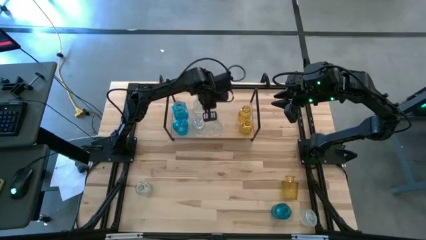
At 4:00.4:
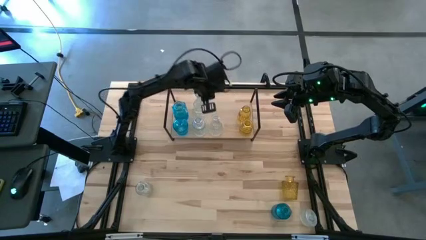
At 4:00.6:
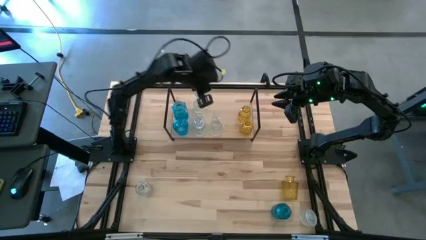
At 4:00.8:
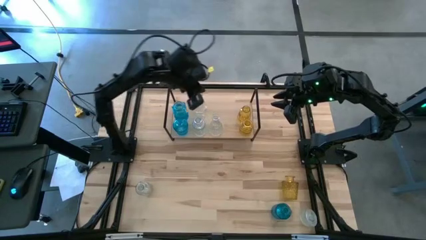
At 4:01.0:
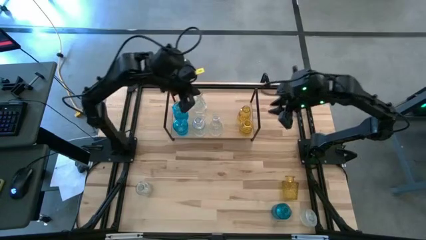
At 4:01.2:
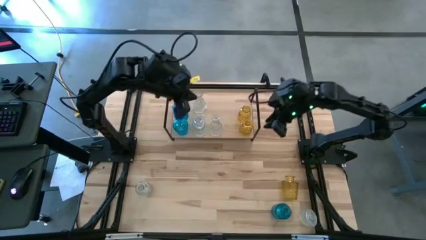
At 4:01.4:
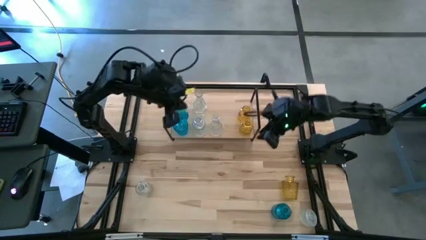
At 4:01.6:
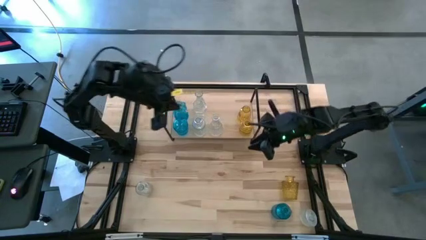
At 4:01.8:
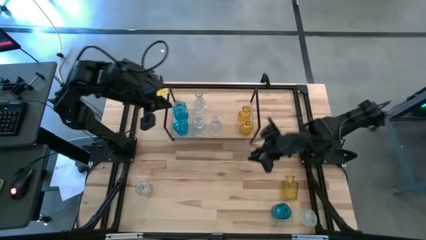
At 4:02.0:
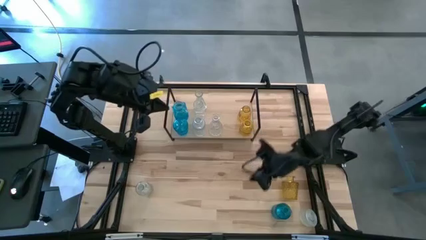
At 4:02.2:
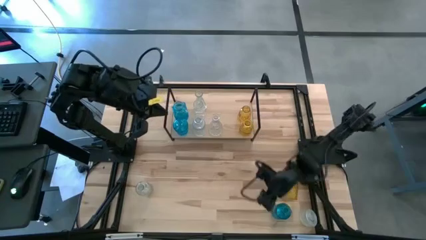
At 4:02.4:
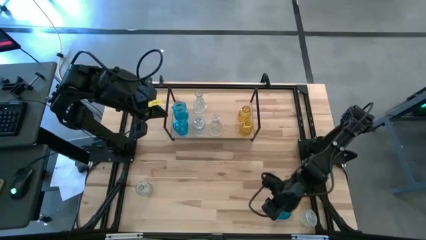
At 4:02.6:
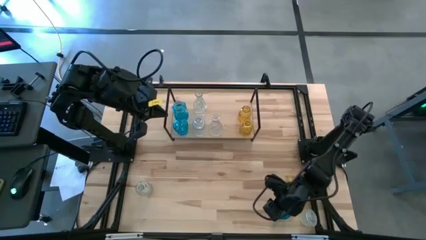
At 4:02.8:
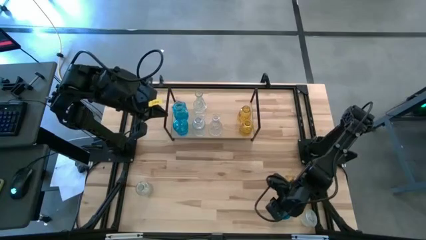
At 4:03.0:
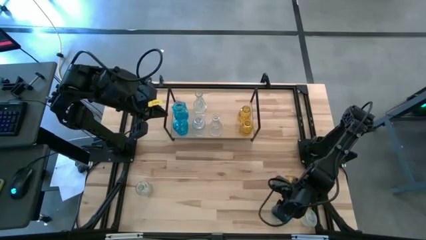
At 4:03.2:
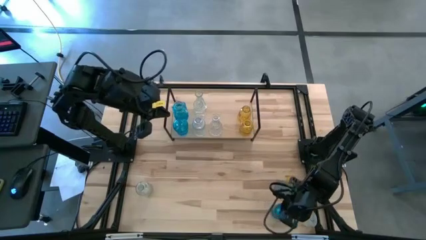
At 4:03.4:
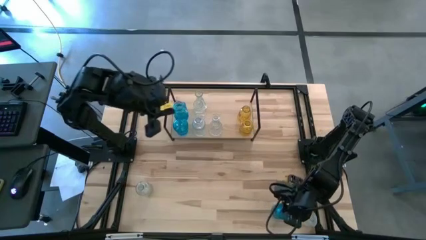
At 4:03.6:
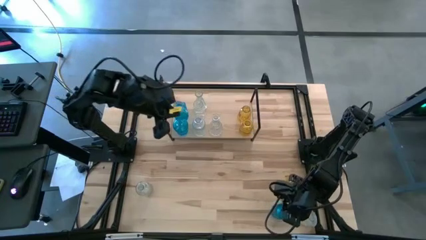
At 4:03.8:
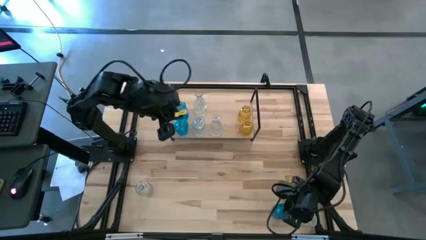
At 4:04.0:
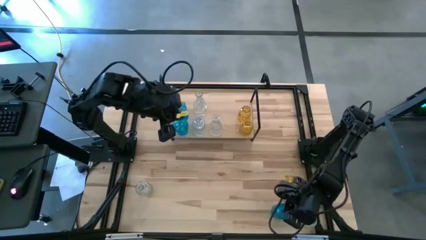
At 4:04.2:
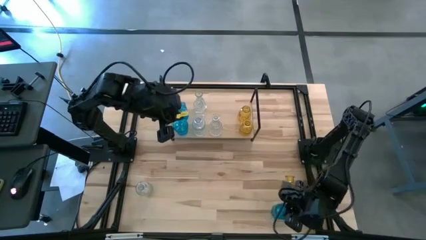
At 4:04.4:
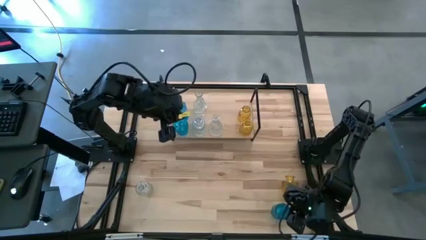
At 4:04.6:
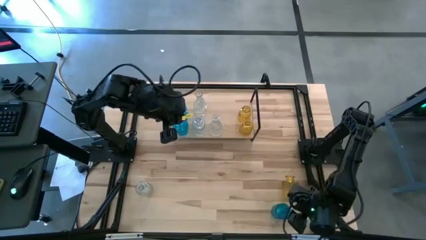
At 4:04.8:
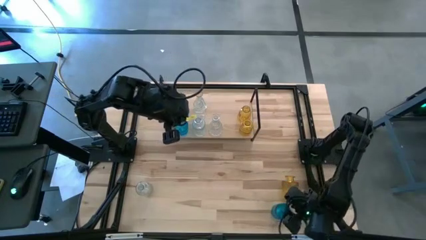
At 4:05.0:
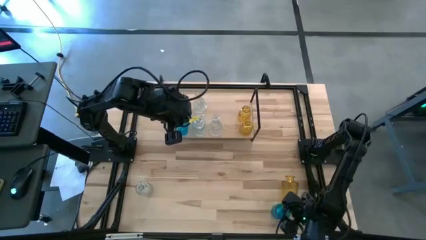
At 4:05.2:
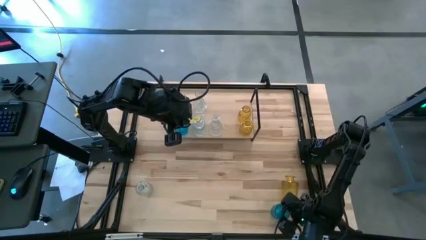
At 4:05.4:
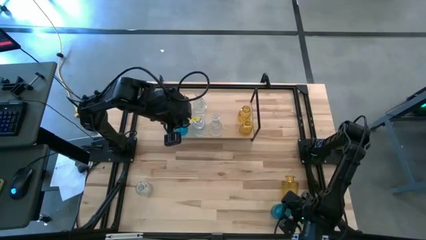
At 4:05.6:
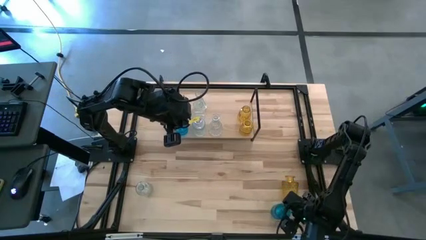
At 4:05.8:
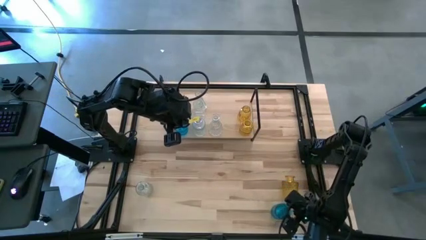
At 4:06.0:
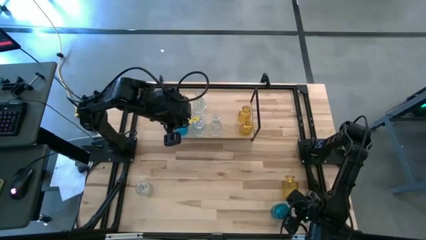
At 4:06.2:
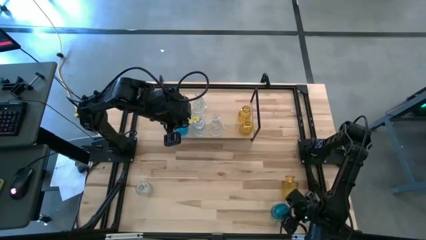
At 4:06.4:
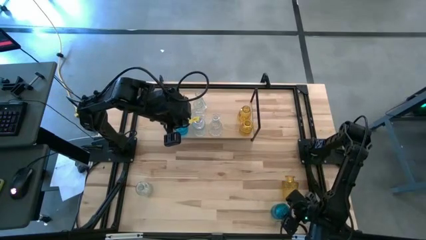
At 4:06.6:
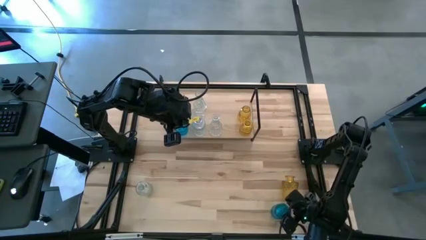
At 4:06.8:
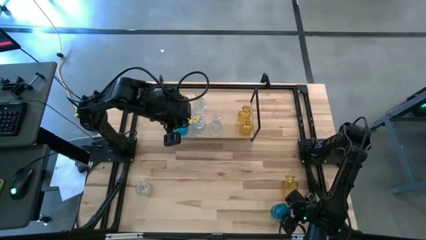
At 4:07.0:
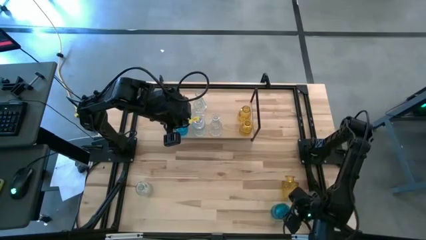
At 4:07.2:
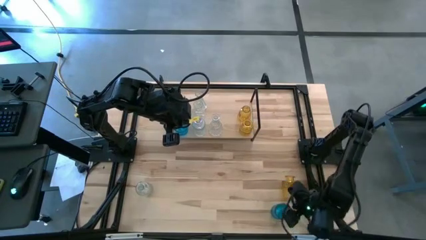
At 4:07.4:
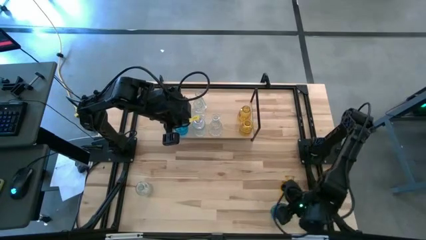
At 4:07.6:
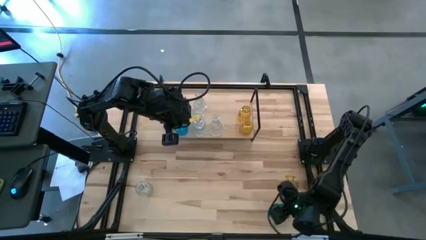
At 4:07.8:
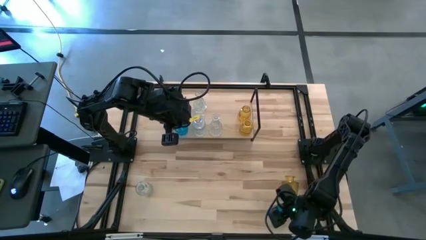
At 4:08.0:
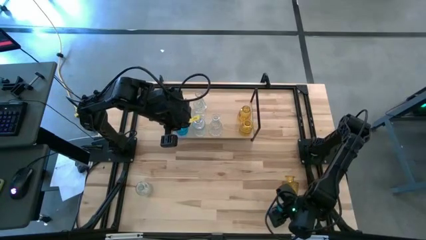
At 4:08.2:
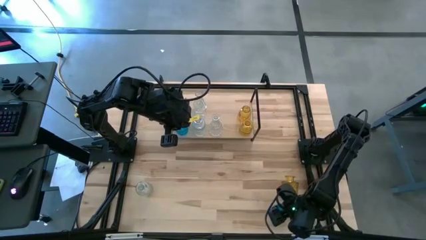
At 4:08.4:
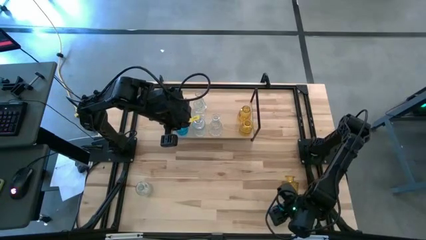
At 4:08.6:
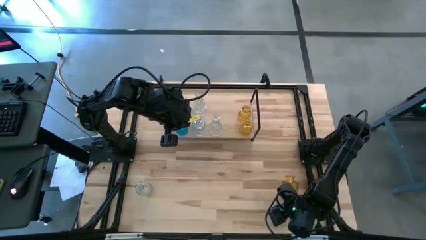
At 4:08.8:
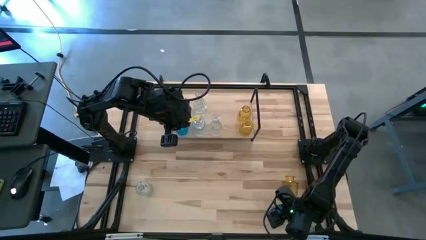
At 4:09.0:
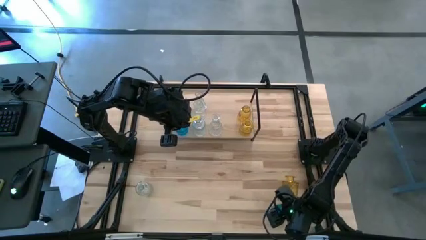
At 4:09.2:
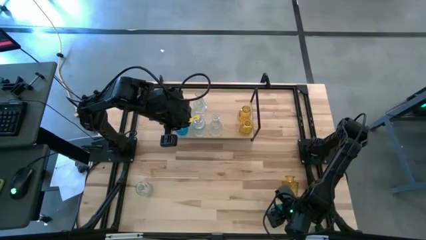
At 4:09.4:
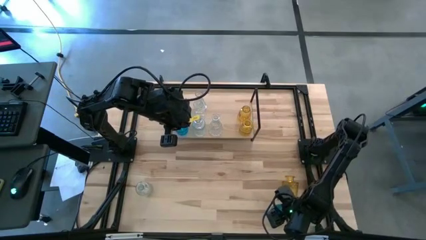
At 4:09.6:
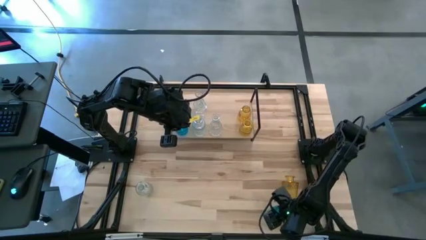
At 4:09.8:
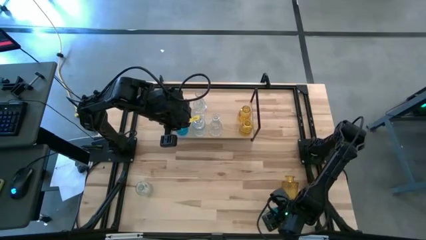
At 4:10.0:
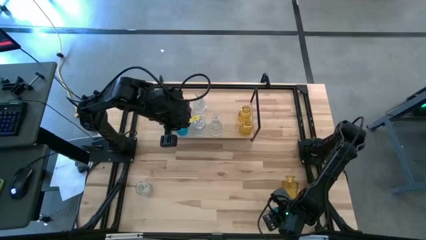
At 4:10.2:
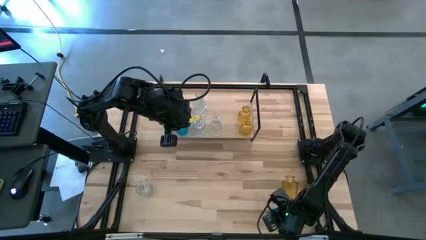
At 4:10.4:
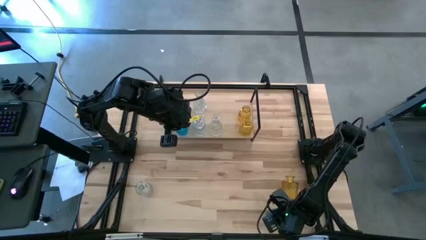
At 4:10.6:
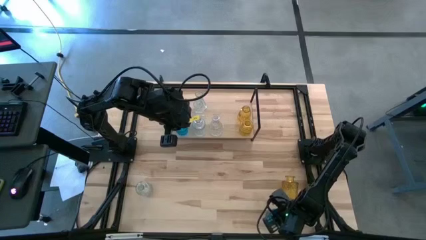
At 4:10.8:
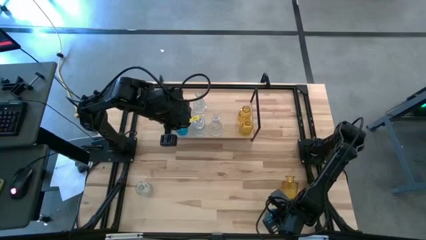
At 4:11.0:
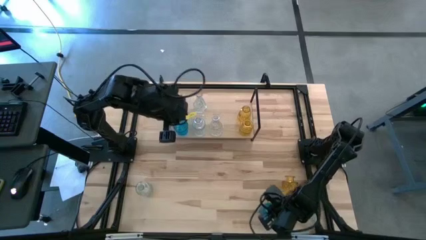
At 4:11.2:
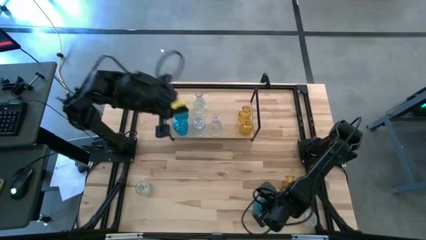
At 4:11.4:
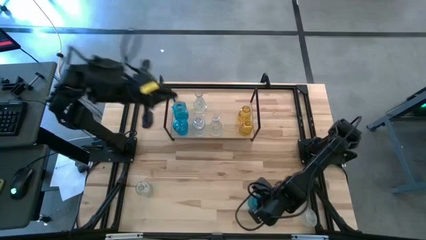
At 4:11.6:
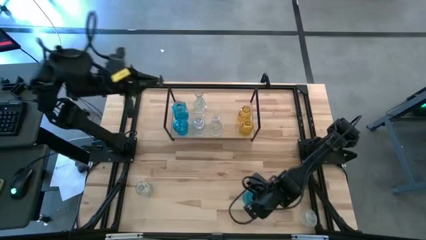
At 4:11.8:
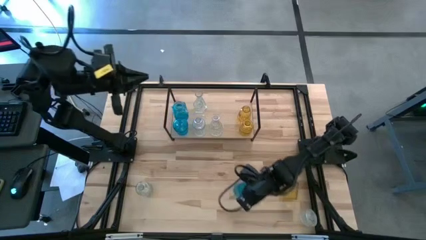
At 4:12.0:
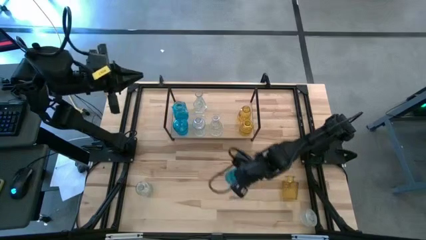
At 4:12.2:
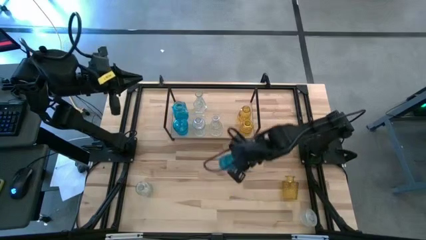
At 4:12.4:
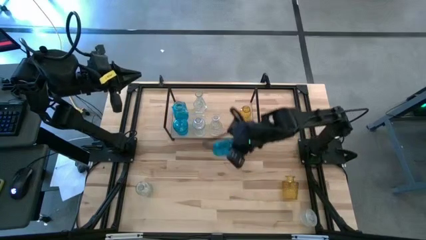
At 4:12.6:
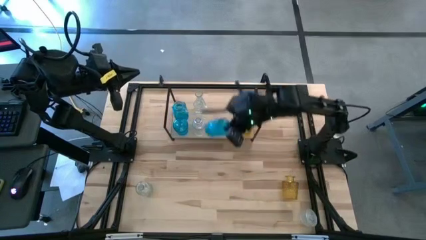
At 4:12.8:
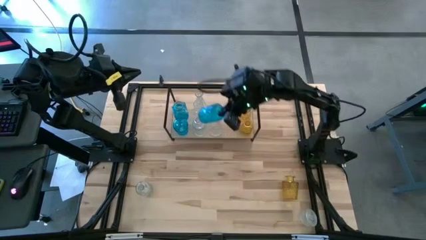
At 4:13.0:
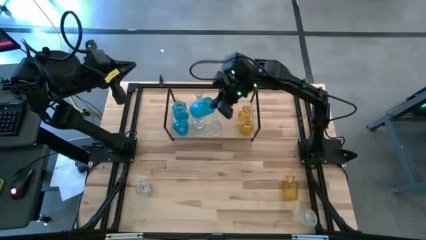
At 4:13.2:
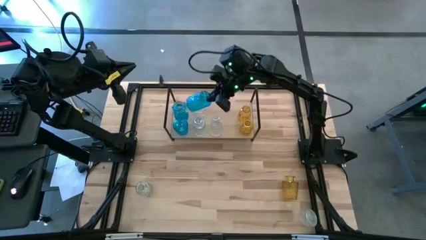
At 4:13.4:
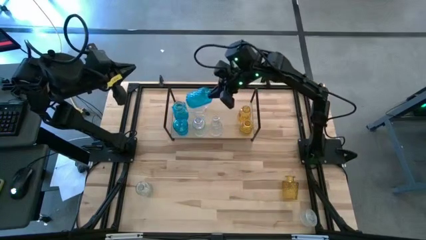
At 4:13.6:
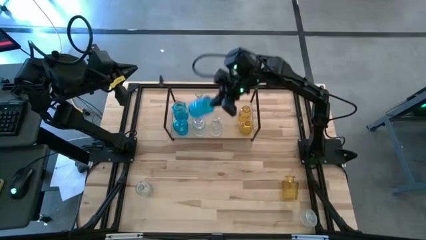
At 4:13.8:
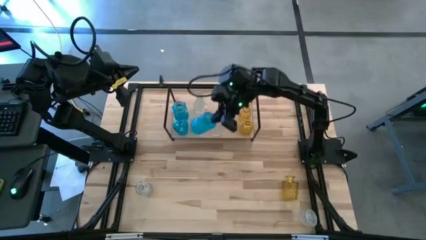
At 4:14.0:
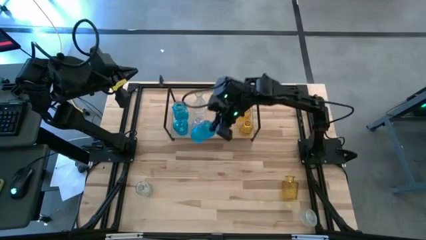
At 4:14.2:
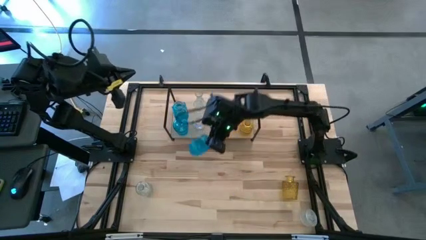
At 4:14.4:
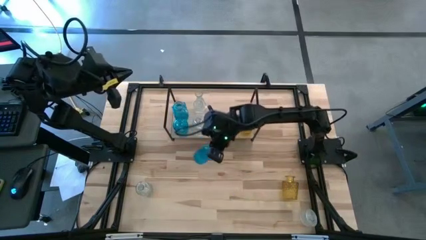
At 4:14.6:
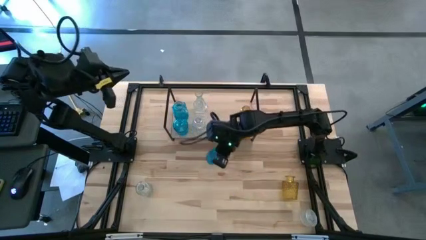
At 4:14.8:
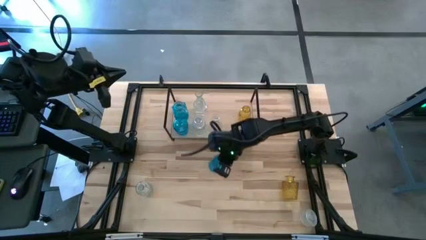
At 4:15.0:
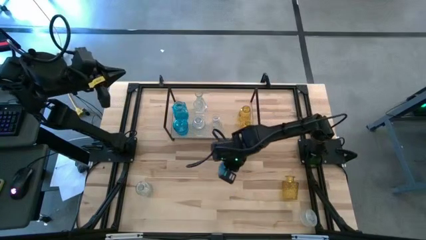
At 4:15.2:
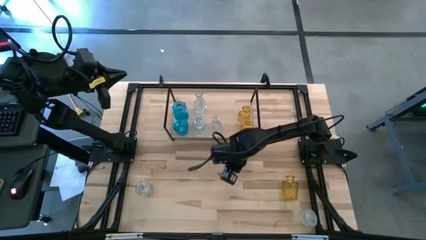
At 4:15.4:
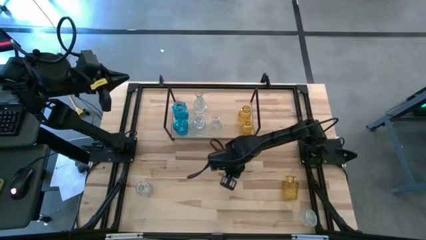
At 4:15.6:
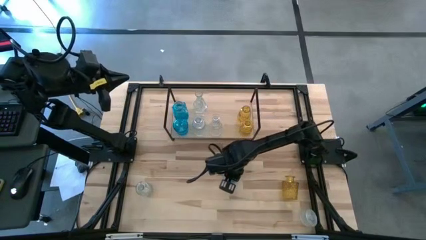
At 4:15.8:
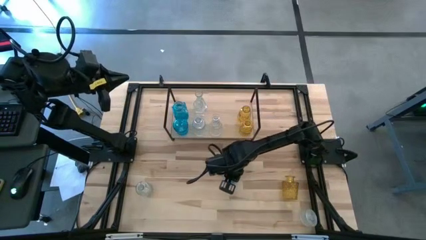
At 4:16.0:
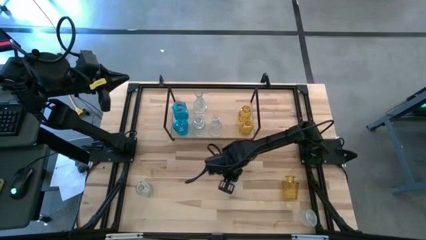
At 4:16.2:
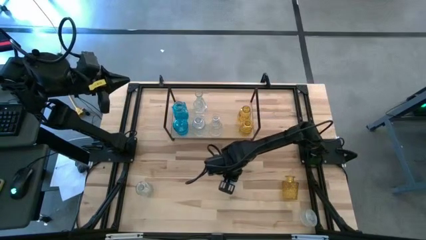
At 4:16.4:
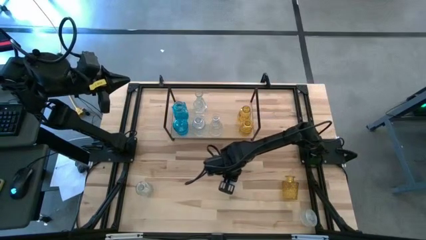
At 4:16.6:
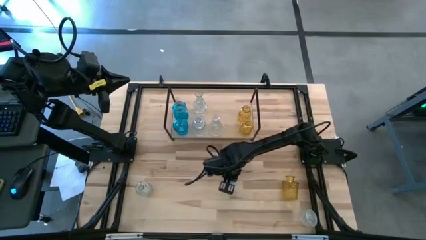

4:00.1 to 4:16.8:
Task: sort vases onto shelf
Put the blue vase on the shelf aligned with the other blue vases
